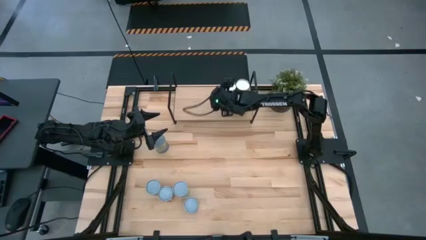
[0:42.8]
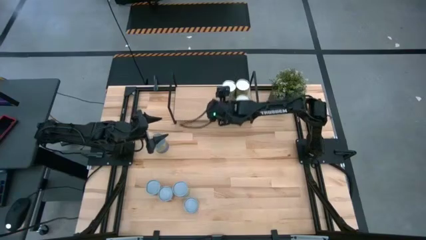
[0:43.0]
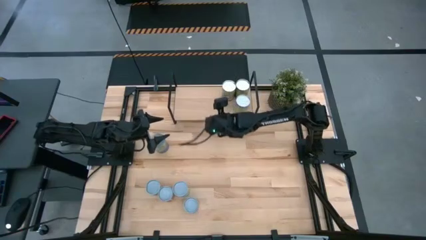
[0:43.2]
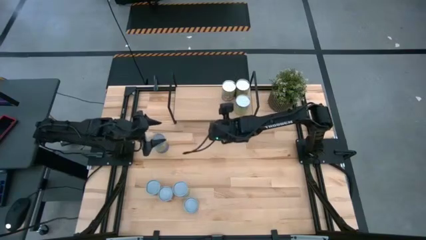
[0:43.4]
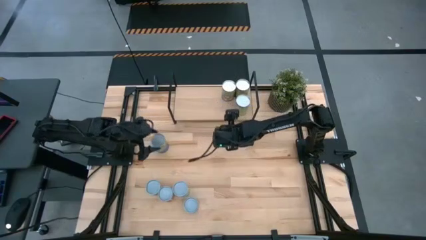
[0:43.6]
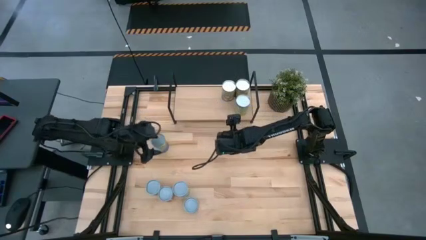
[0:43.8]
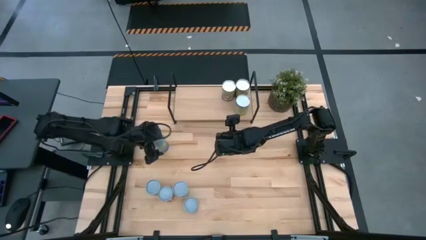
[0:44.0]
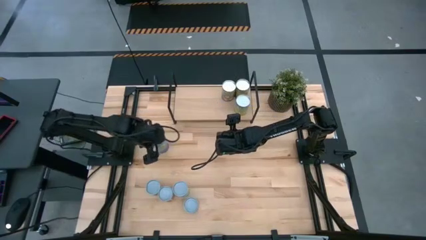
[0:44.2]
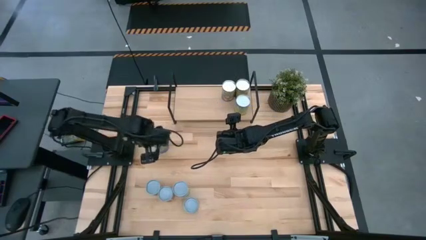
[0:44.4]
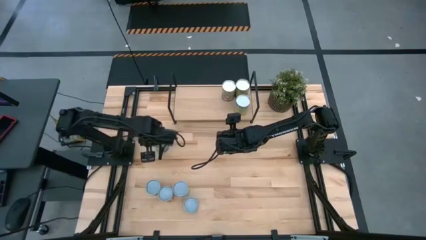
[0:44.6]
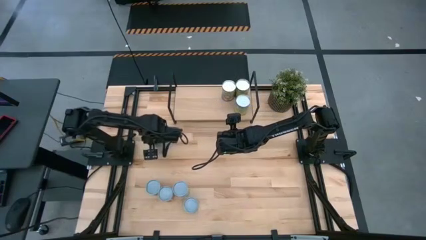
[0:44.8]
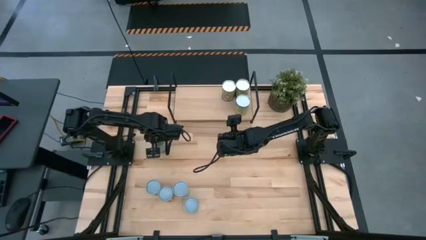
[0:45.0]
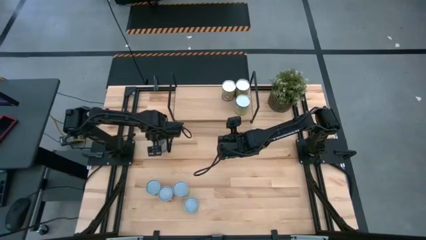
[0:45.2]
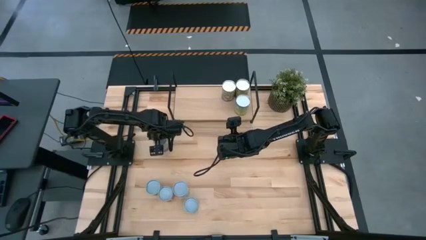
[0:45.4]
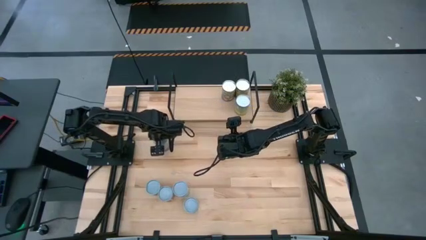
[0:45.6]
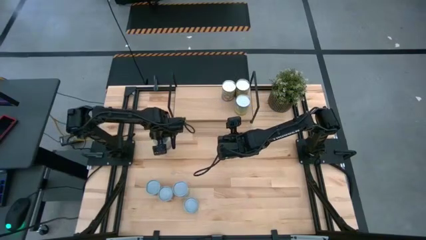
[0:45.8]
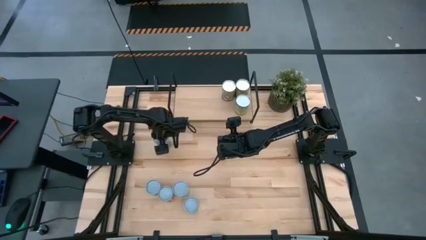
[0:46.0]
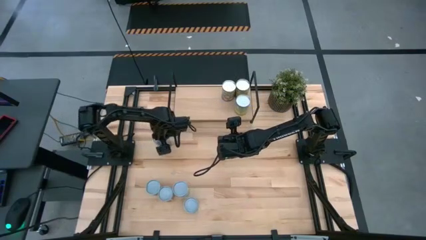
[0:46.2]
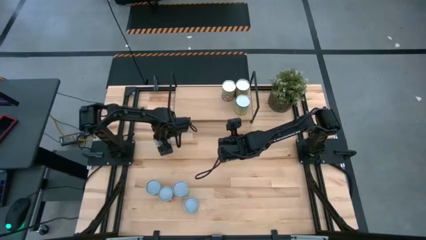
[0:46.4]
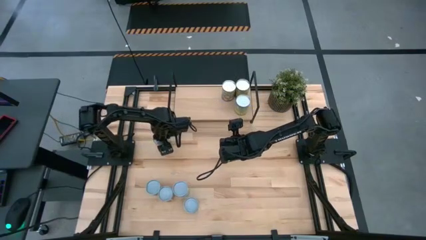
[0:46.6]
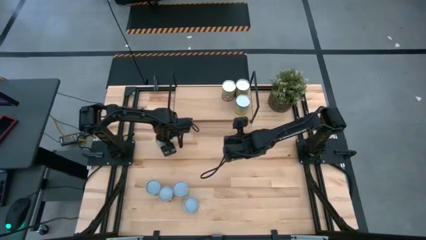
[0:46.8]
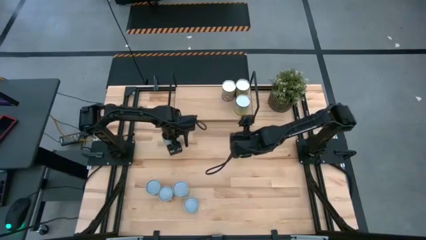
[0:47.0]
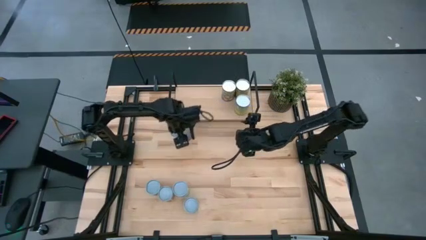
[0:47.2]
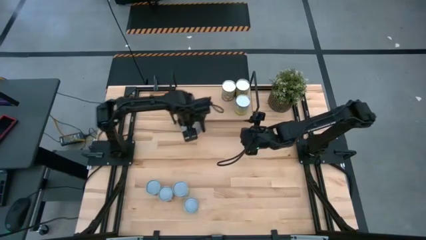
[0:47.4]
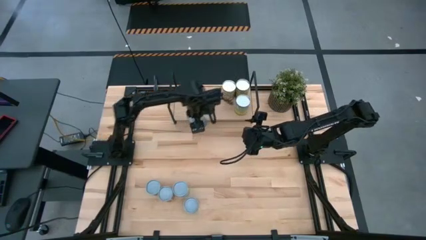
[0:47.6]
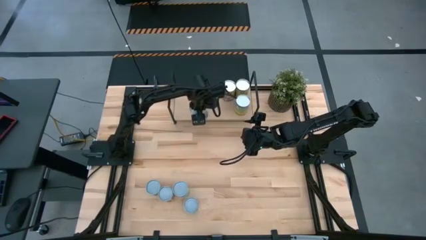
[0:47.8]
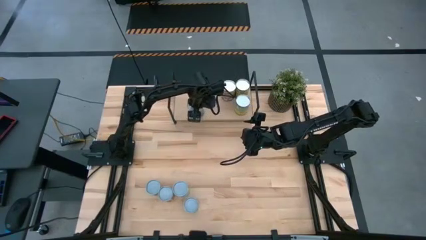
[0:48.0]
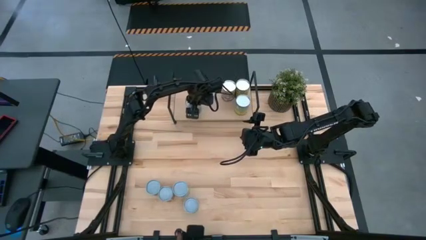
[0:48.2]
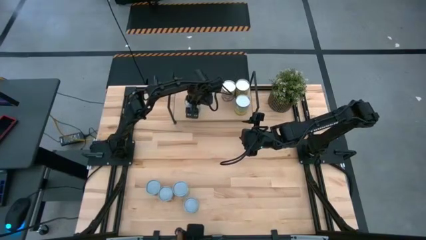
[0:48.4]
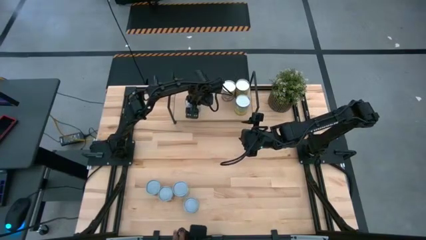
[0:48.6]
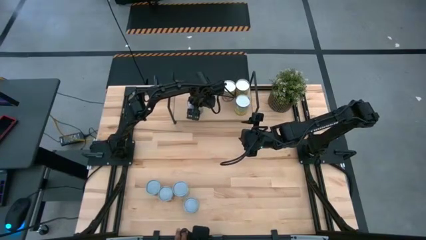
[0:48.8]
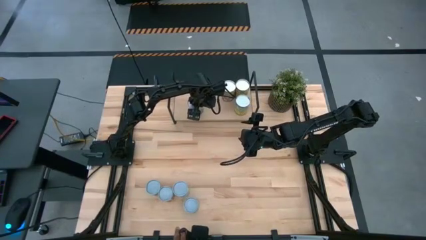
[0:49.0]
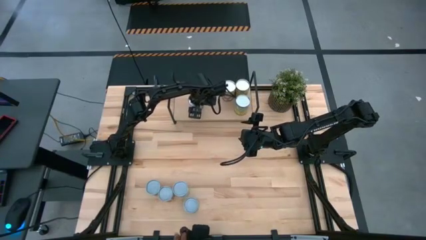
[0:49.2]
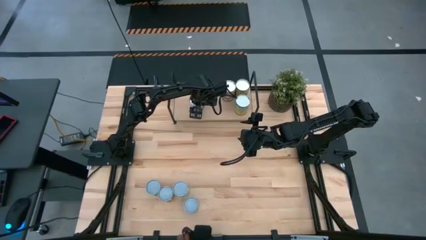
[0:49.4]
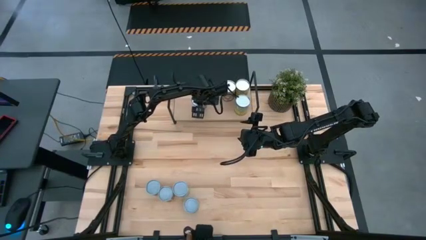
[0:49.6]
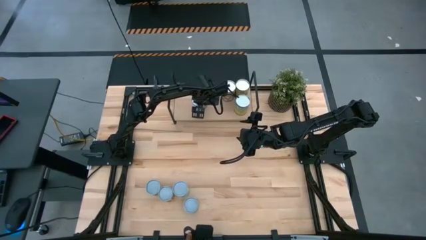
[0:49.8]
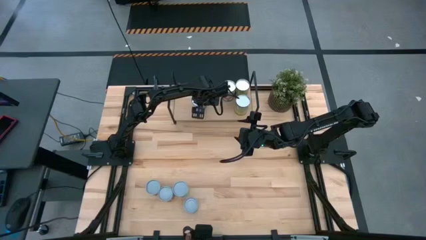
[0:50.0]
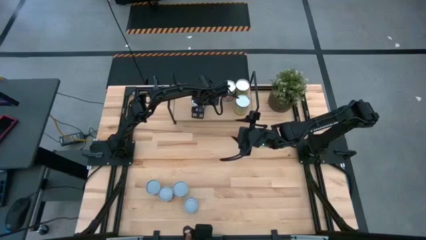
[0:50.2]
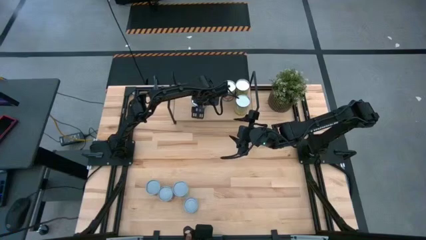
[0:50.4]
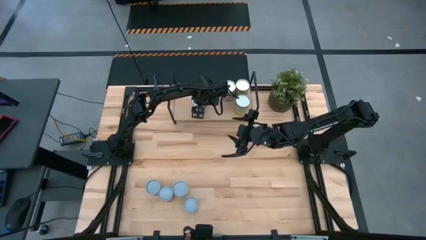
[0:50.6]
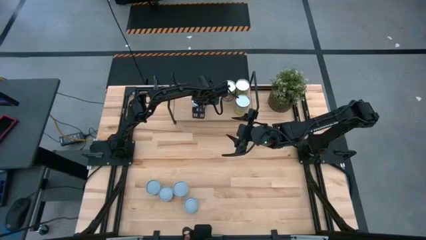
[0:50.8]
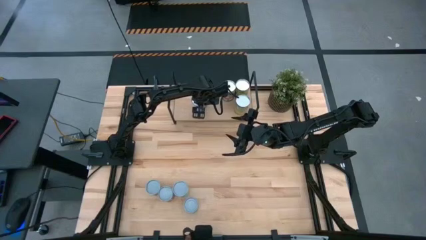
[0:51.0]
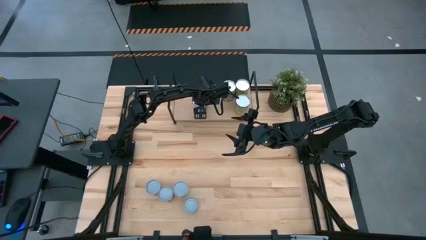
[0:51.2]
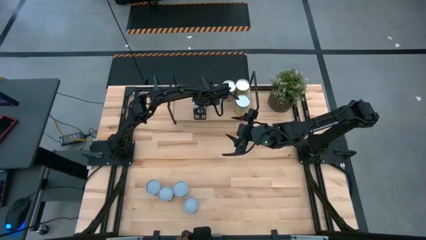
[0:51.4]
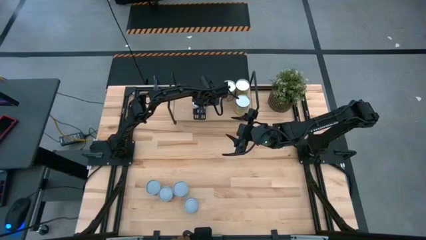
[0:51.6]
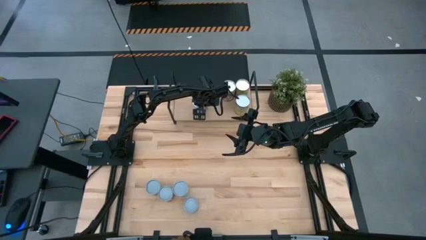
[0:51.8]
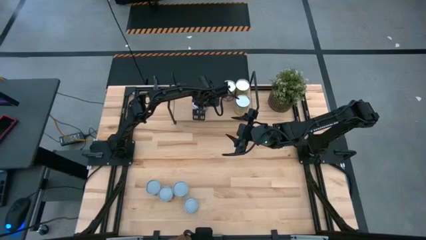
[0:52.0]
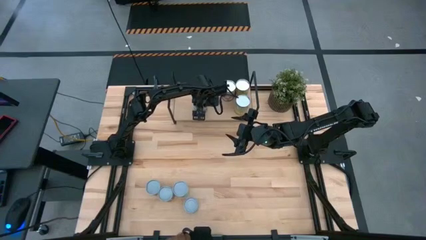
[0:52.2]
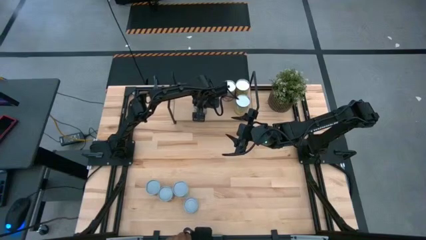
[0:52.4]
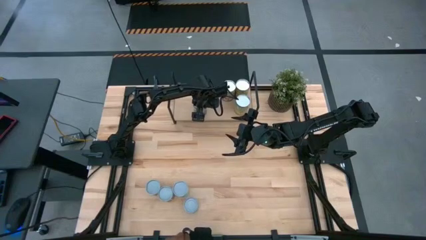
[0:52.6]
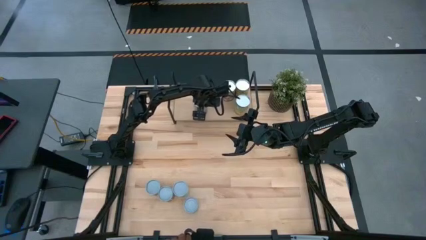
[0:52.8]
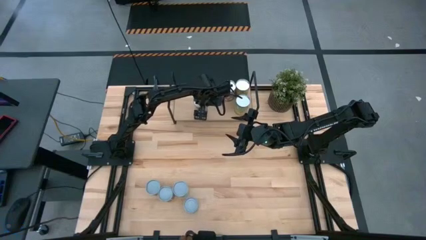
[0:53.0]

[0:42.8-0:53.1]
Task: Pick and place cans onto a shelf
Put the canned peas on the shelf
